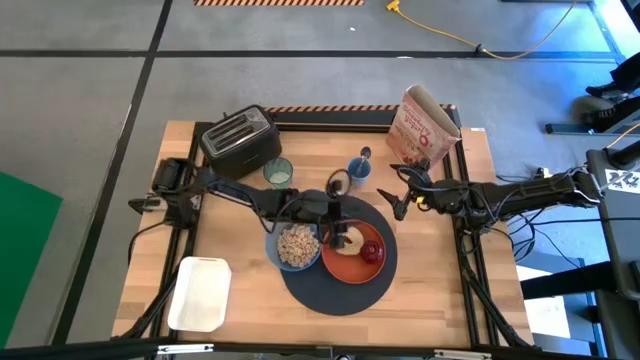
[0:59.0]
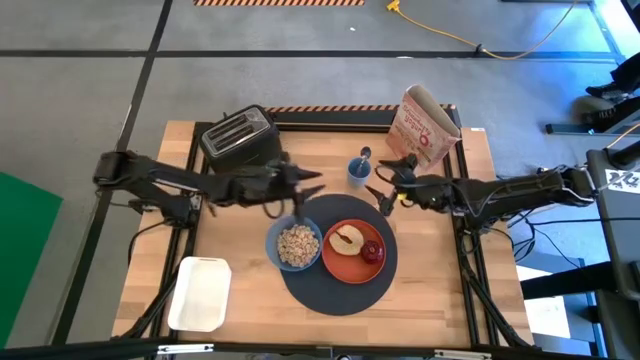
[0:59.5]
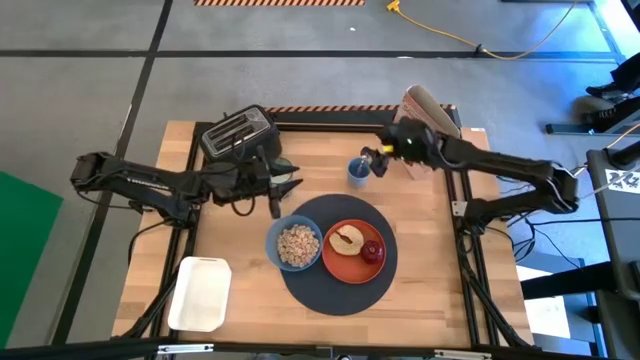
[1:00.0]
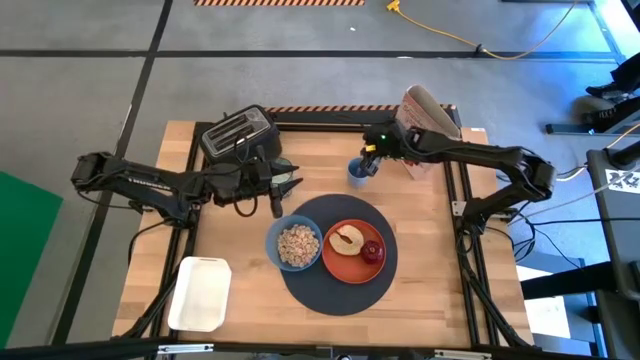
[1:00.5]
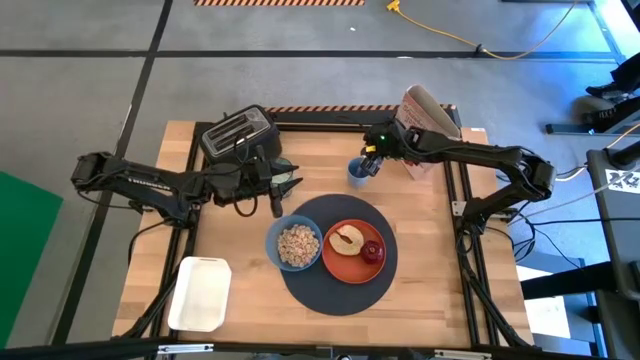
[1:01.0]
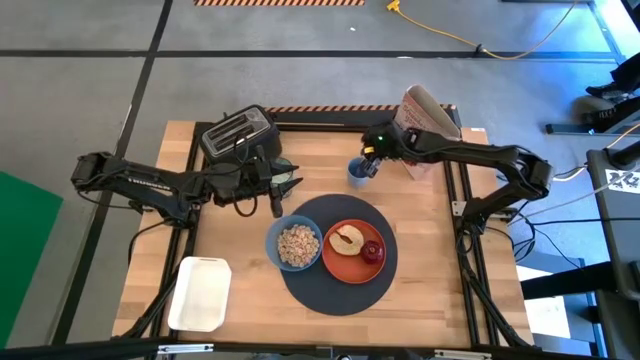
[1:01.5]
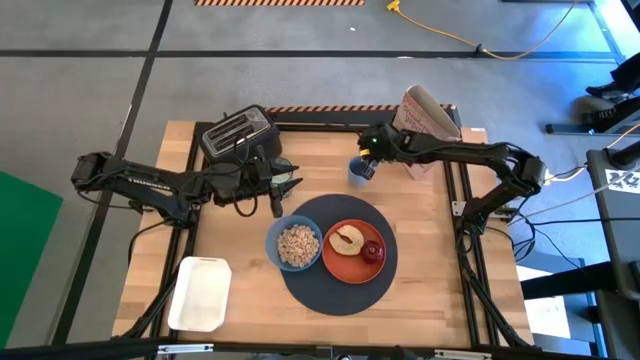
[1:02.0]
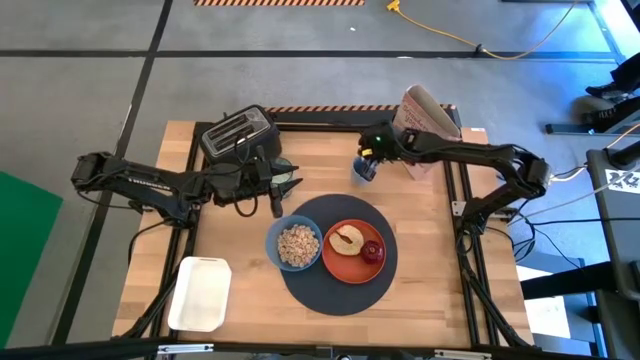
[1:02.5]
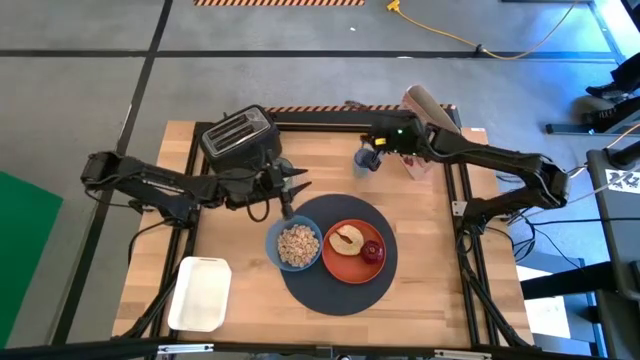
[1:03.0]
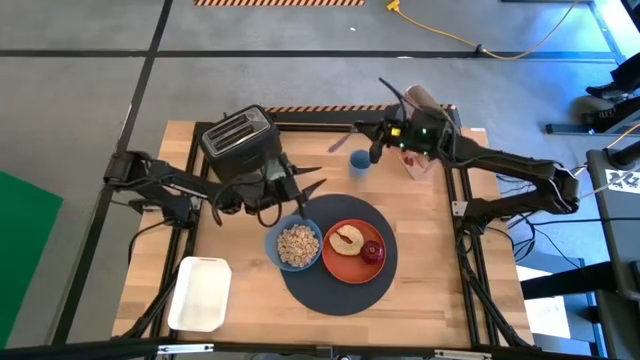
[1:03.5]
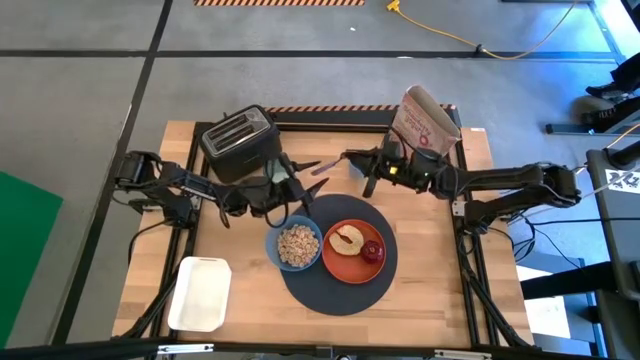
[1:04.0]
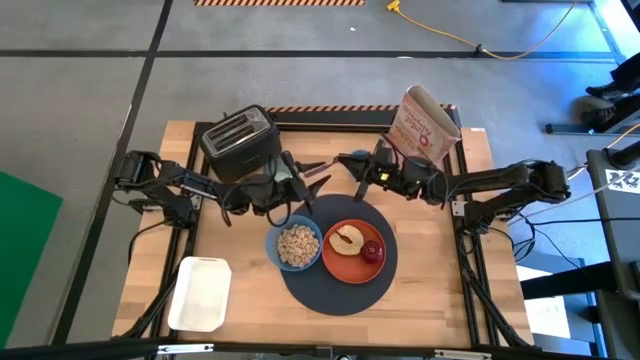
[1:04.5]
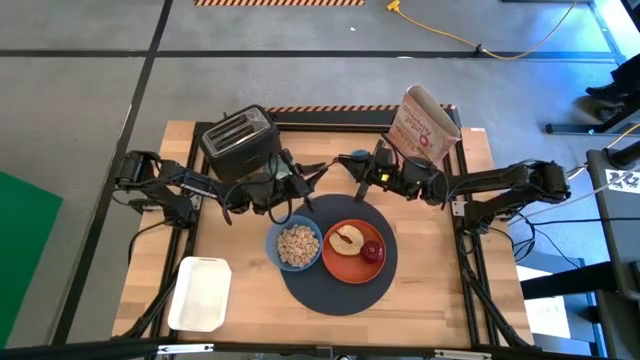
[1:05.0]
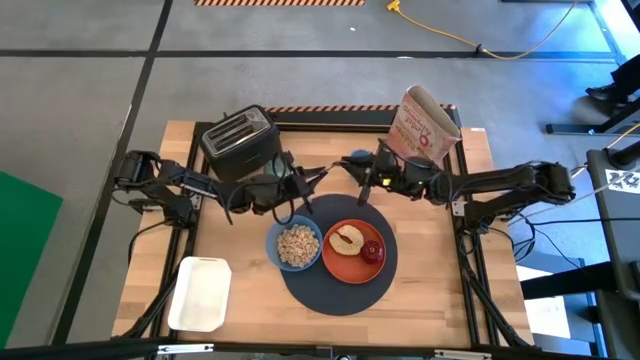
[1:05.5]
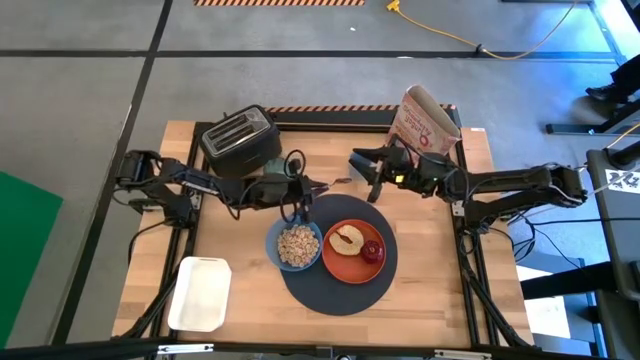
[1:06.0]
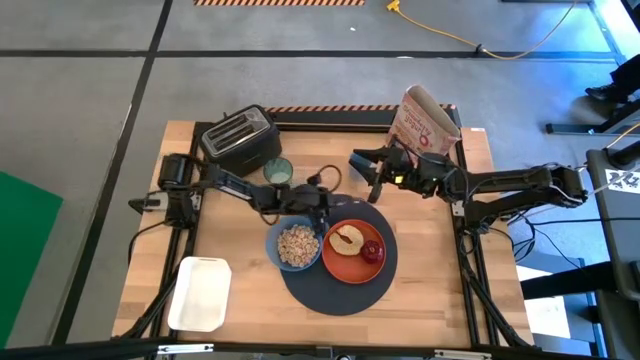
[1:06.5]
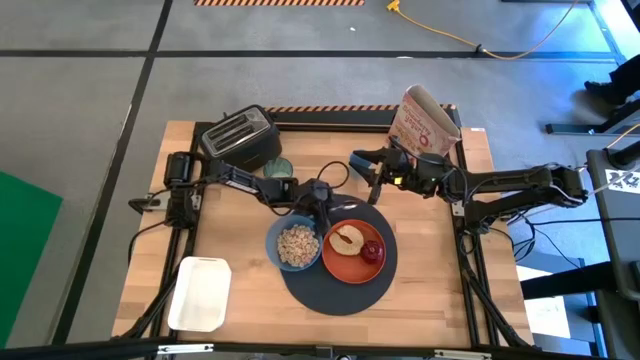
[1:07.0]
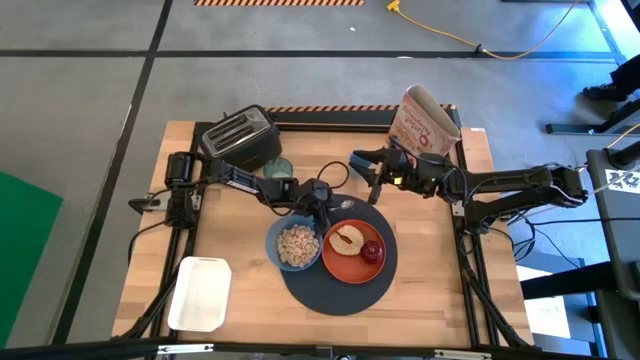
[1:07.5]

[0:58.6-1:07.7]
Task: Arrange a breakfast setting
Put the purple spoon to the top of the orange plate on the table mat

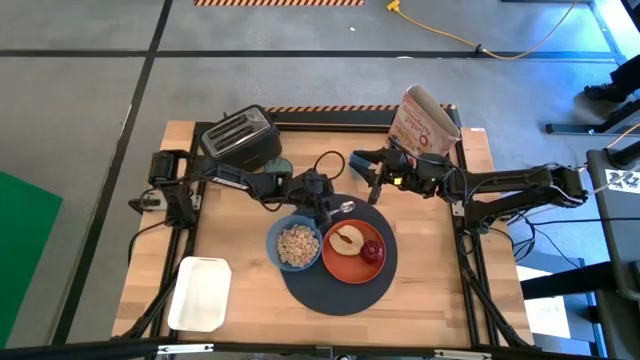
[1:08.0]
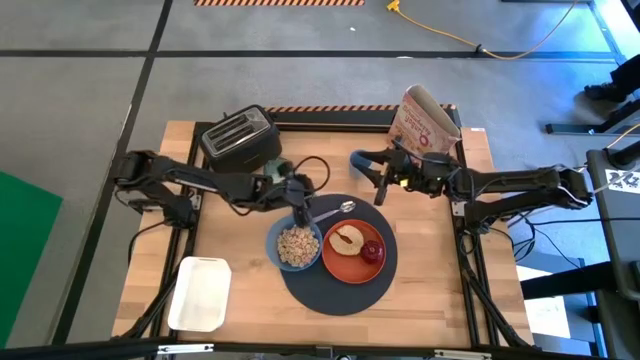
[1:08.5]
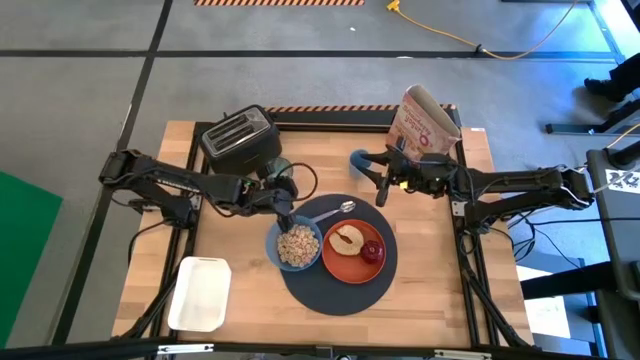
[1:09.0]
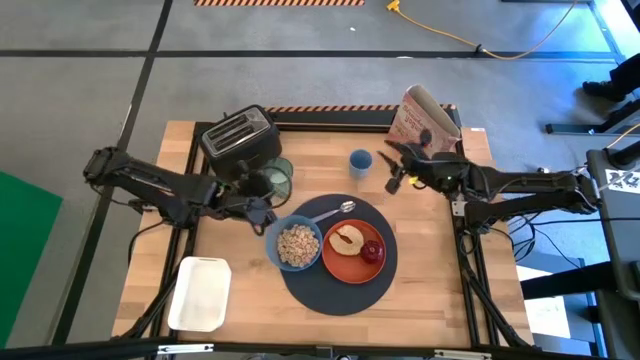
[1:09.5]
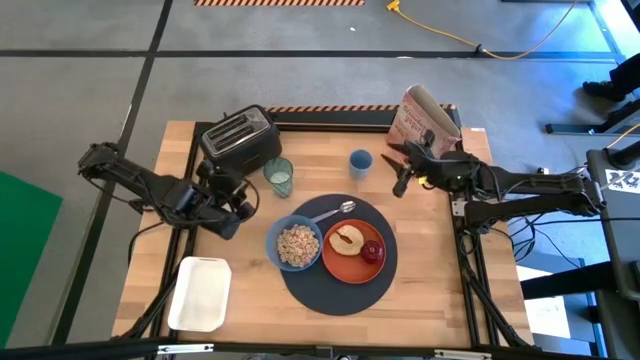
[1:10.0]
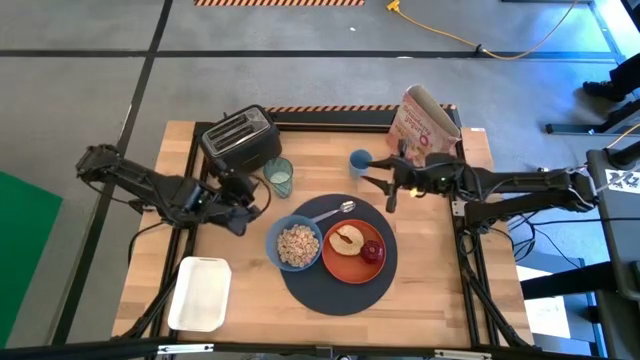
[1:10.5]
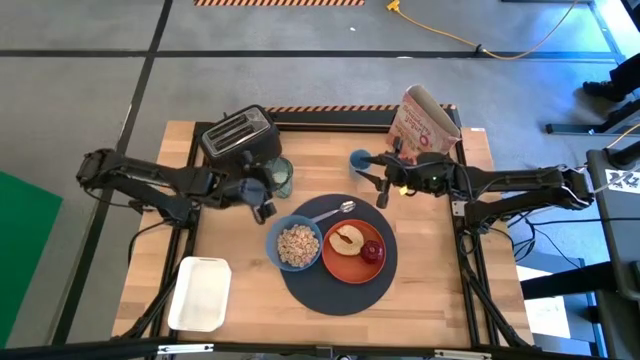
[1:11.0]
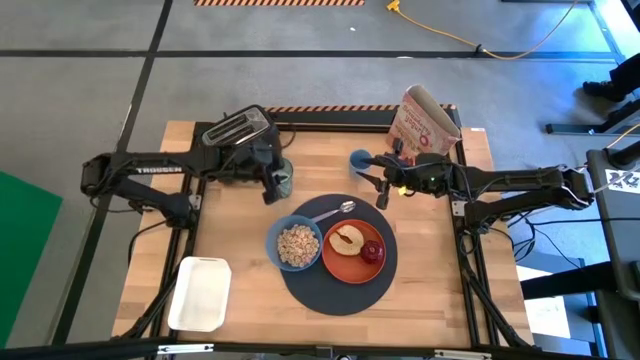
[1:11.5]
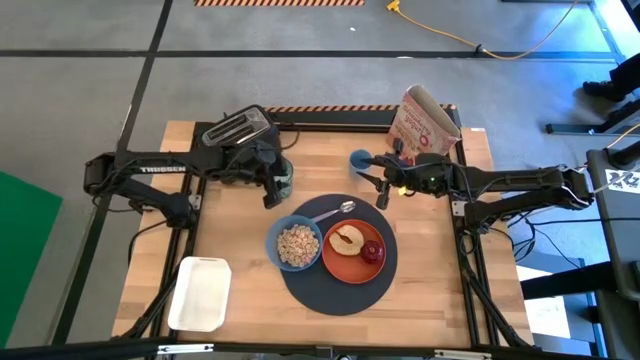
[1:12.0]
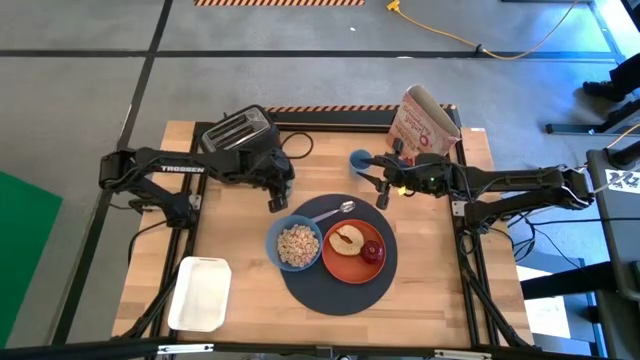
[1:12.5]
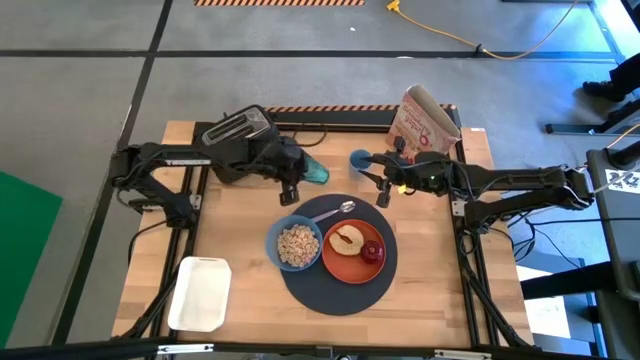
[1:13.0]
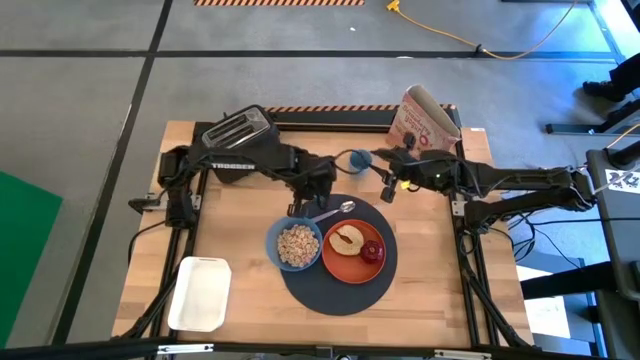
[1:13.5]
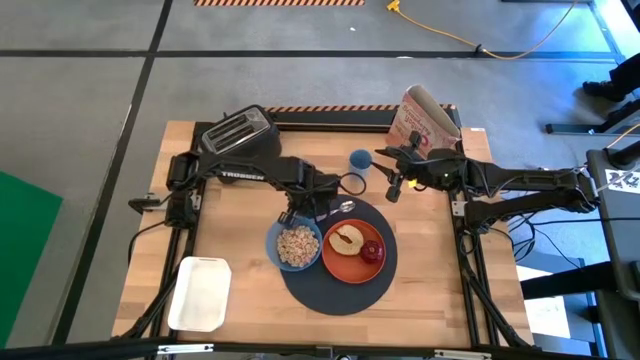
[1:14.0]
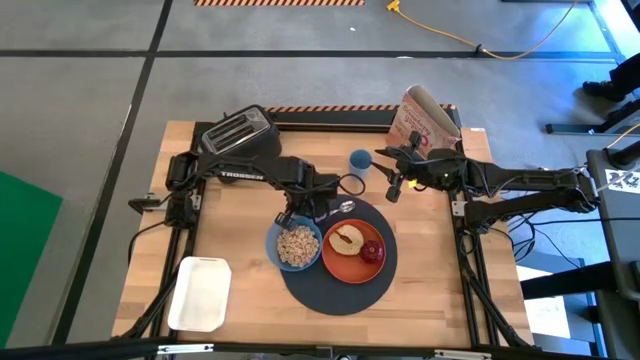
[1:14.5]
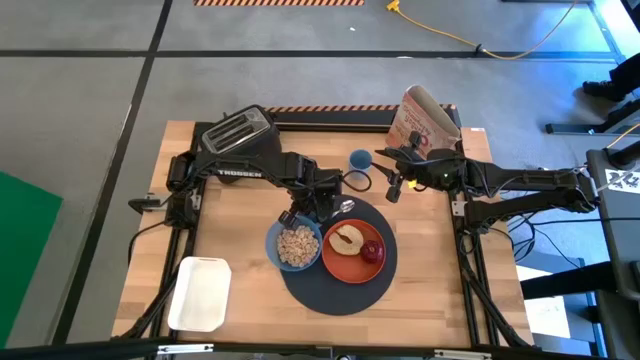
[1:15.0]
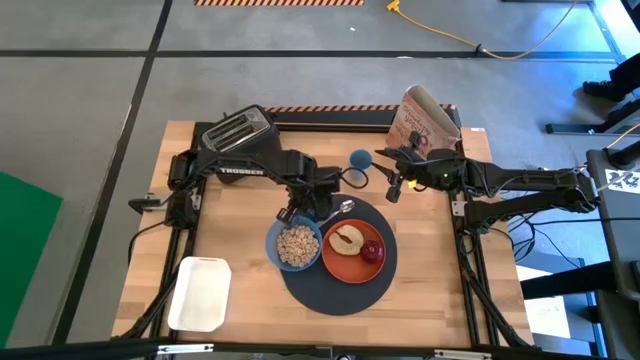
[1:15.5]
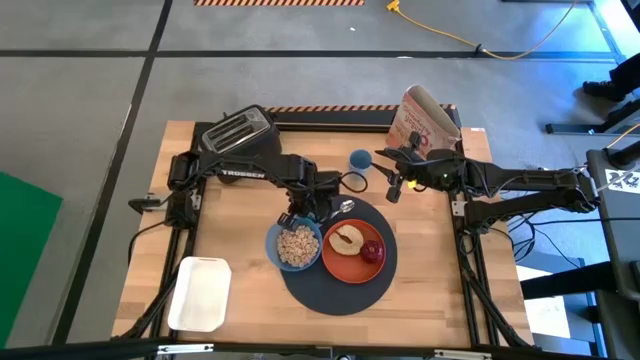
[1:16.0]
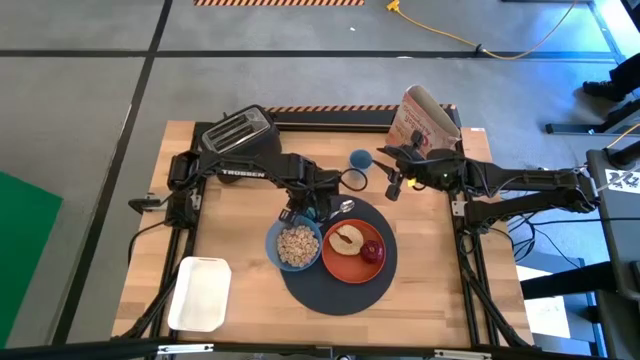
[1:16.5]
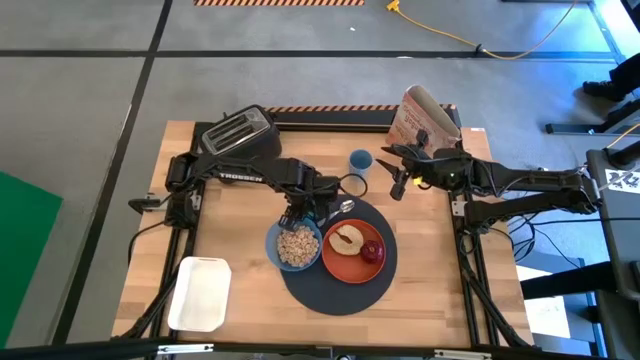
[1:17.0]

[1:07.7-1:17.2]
Put the blue cup to the top of the blue bowl on table mat
